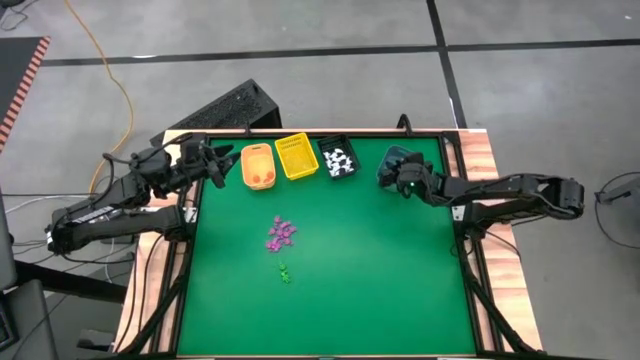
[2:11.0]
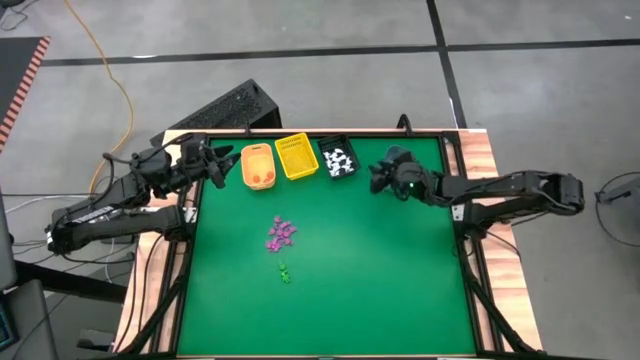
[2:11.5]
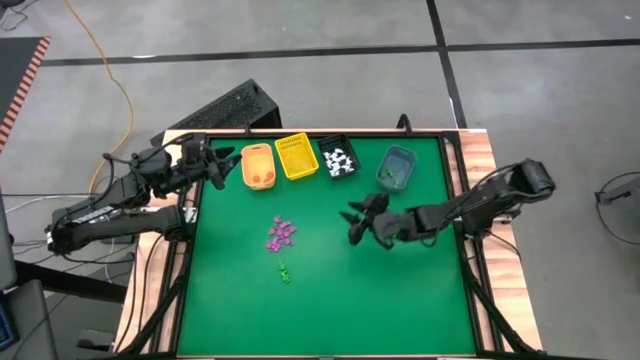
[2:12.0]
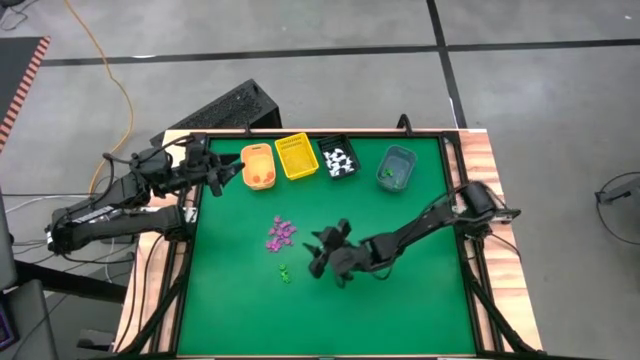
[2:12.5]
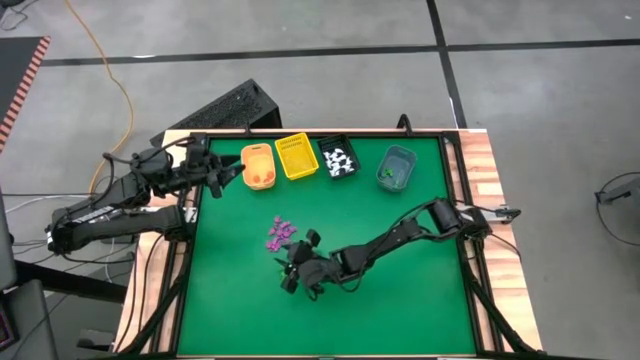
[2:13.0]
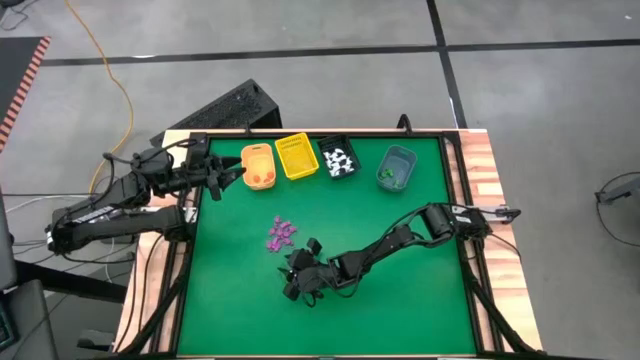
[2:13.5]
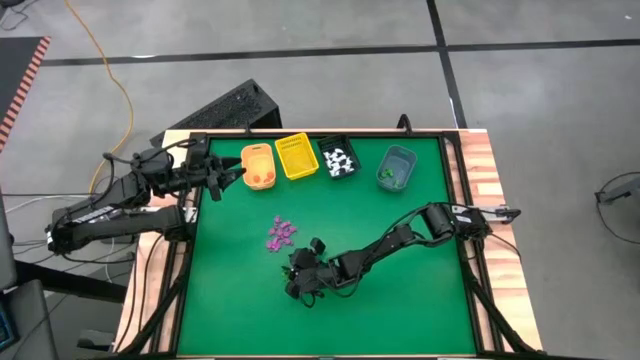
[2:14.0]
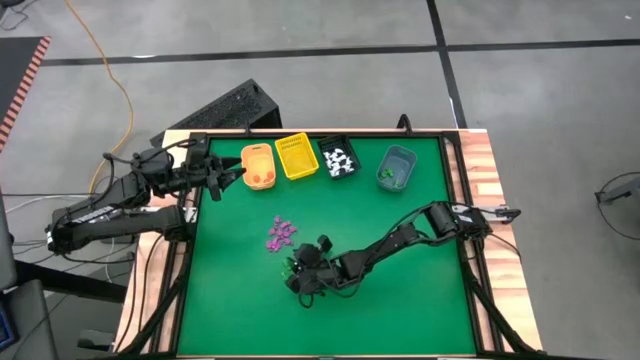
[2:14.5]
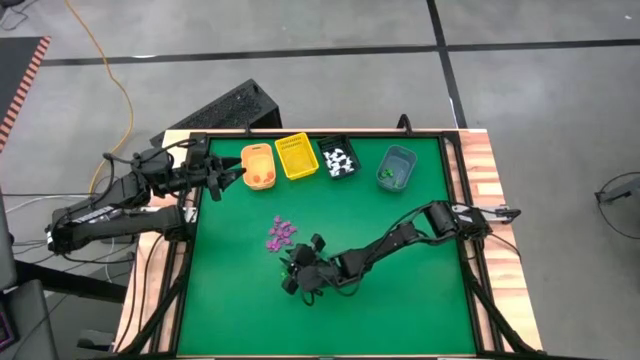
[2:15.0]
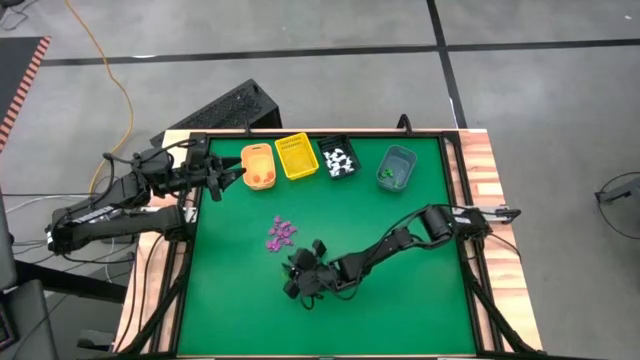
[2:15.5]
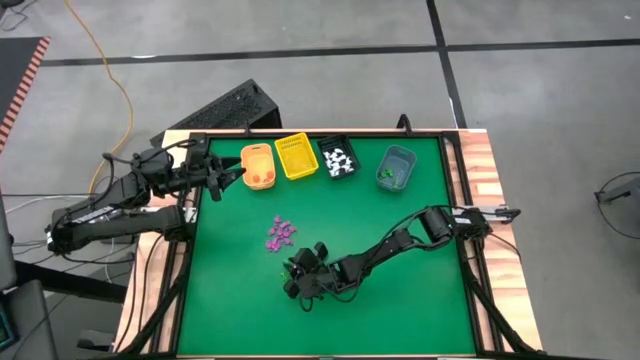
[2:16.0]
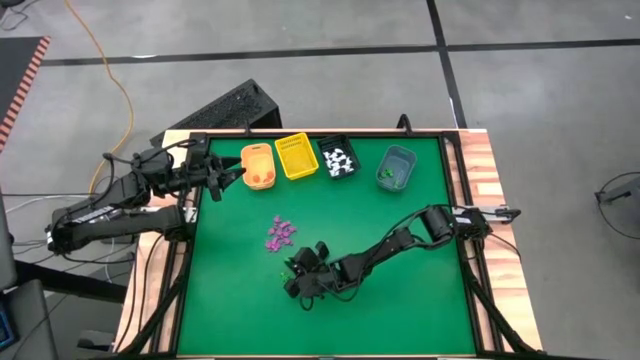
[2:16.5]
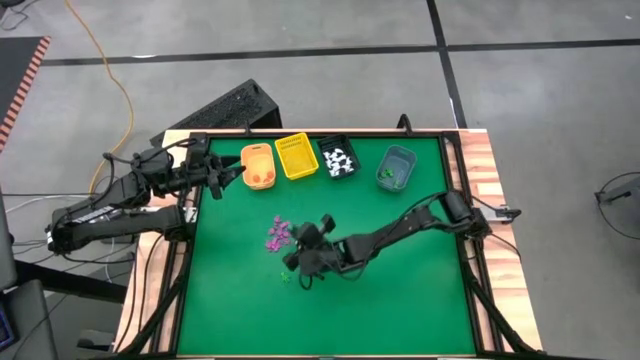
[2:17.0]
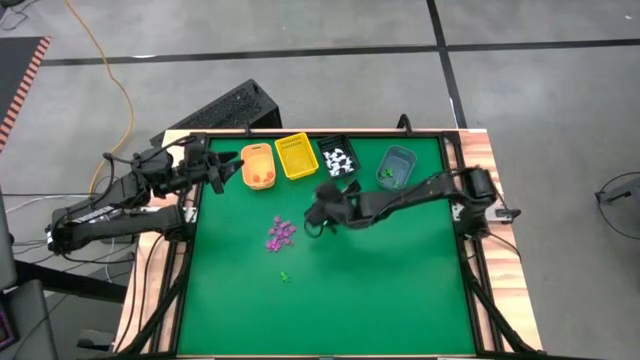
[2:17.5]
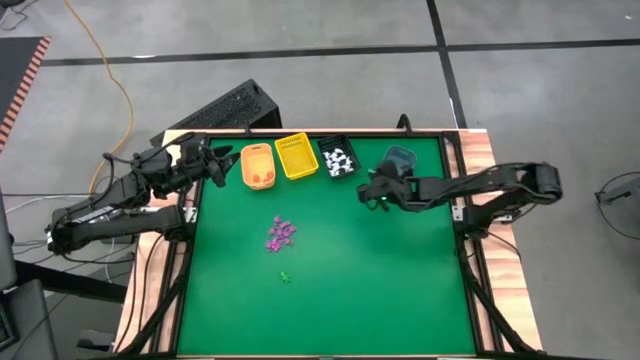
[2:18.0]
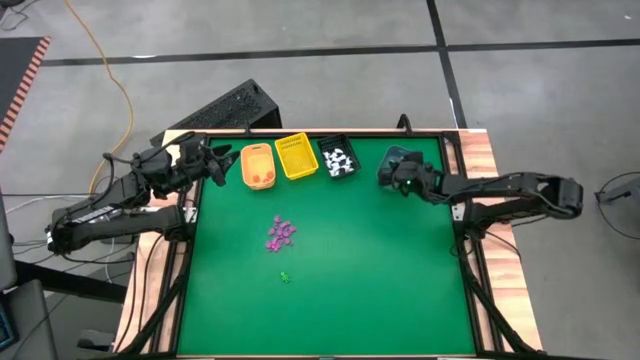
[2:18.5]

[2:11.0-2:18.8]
Task: Sort Halloween decoration
Put the green skeleton toy into the blue bin

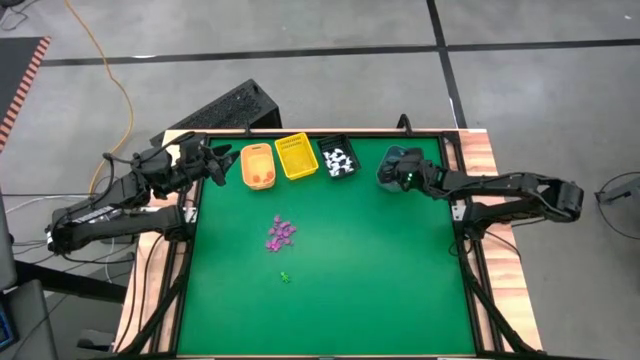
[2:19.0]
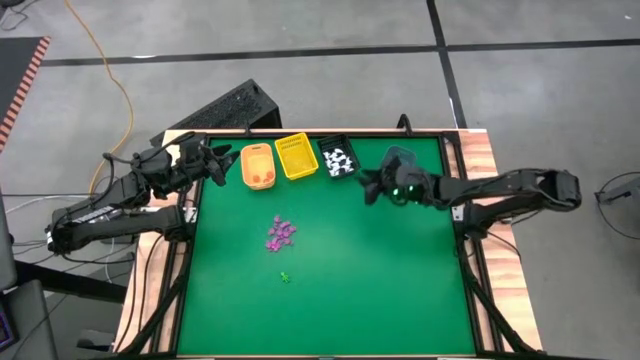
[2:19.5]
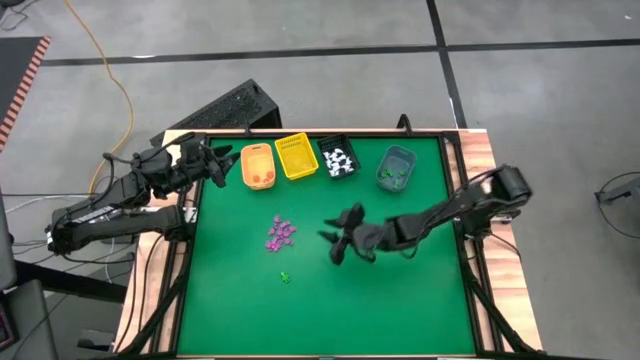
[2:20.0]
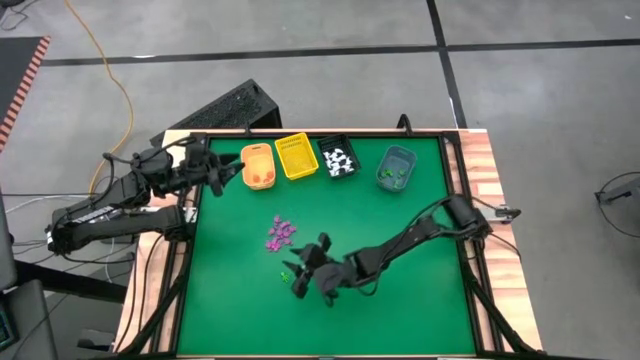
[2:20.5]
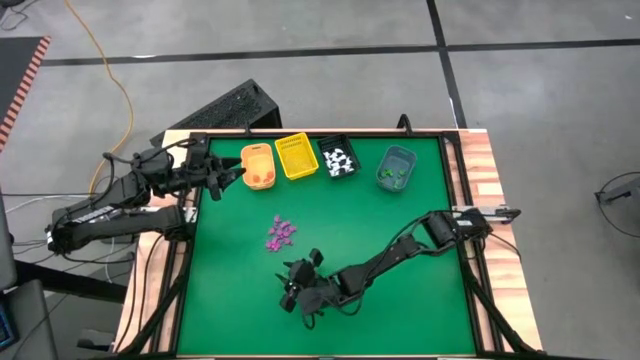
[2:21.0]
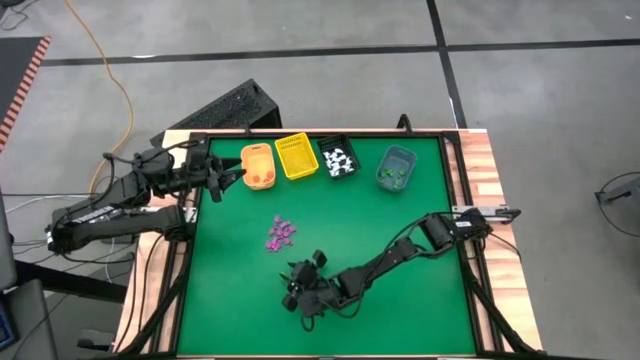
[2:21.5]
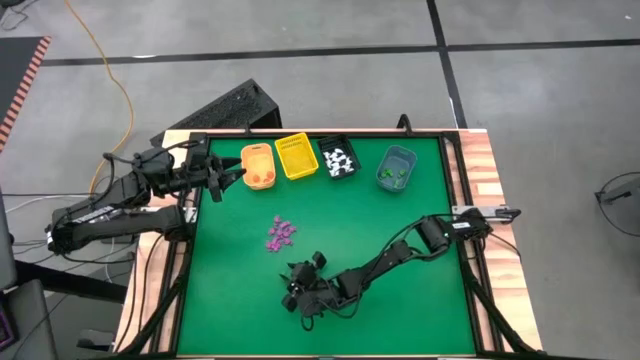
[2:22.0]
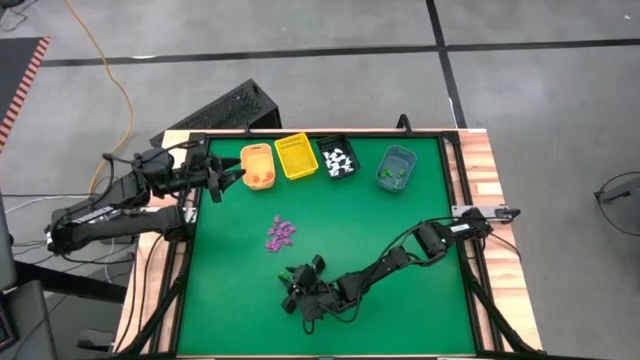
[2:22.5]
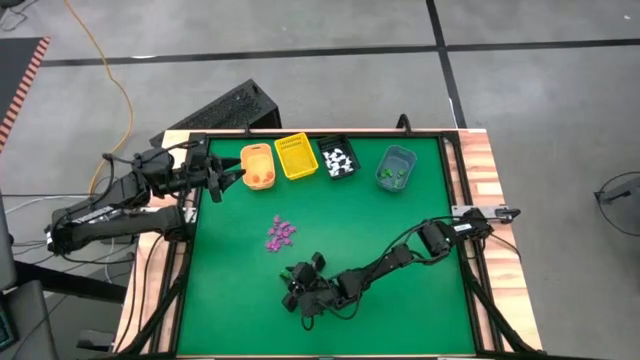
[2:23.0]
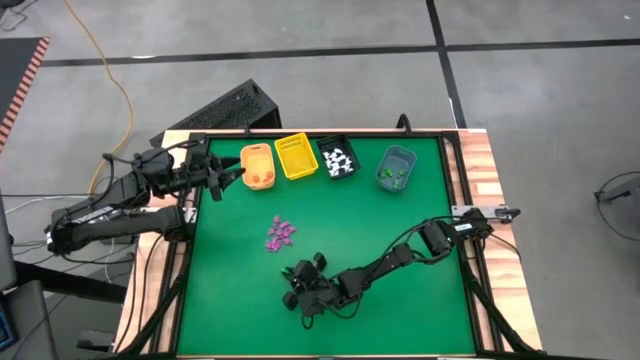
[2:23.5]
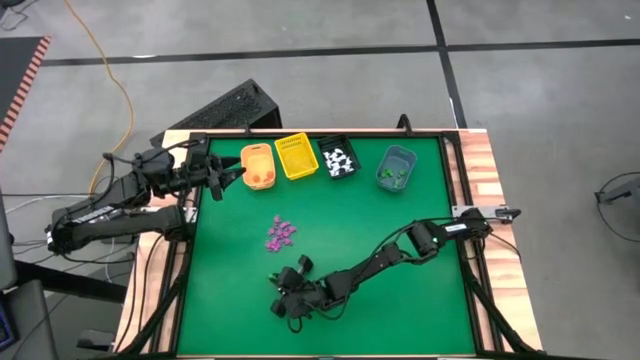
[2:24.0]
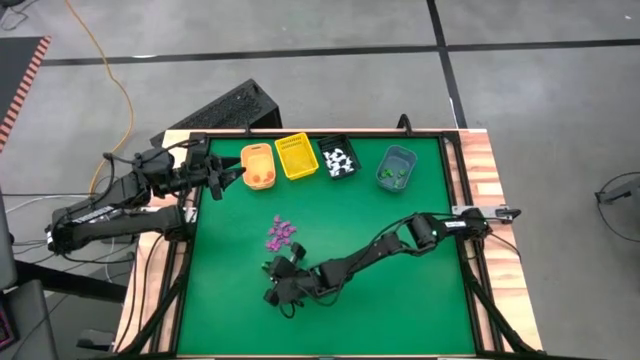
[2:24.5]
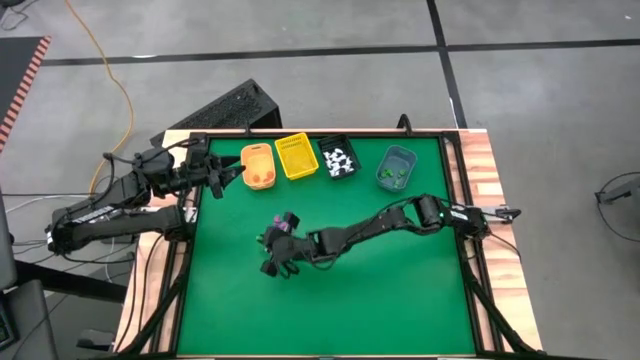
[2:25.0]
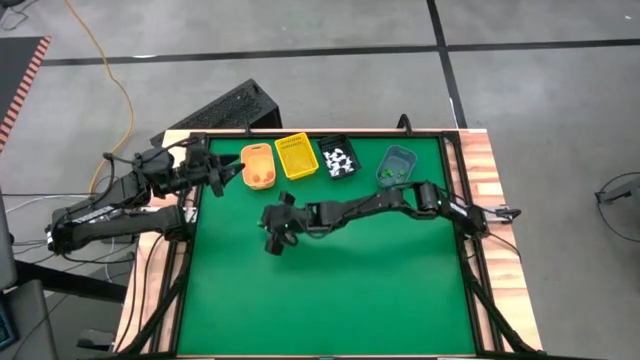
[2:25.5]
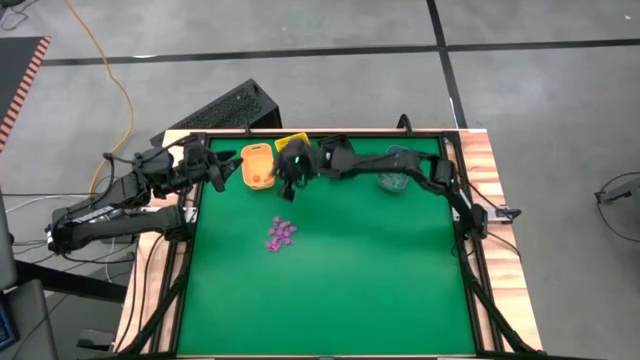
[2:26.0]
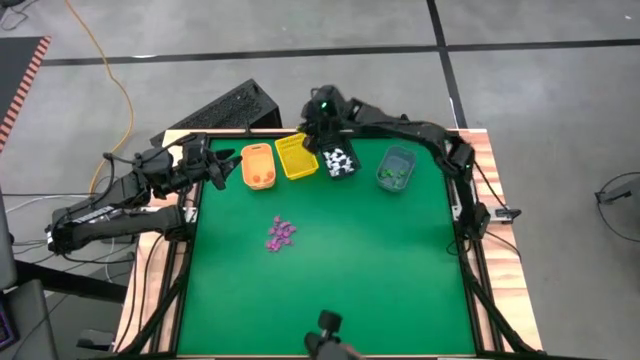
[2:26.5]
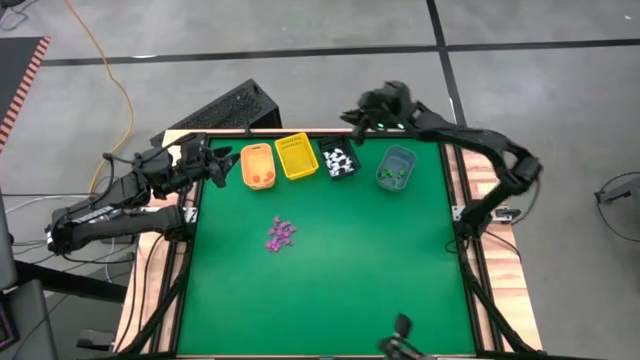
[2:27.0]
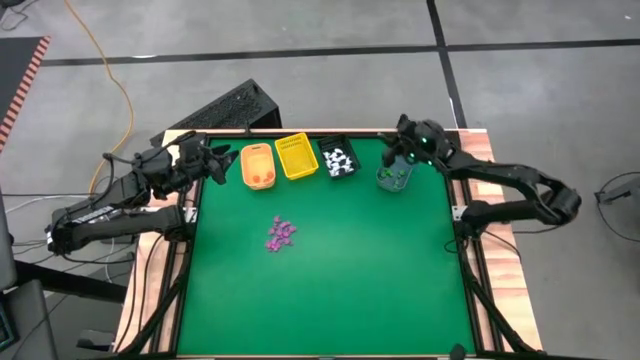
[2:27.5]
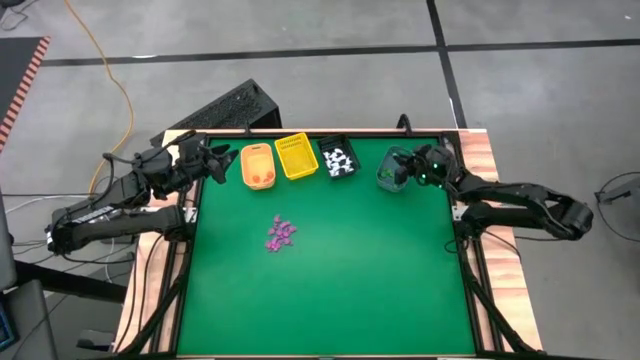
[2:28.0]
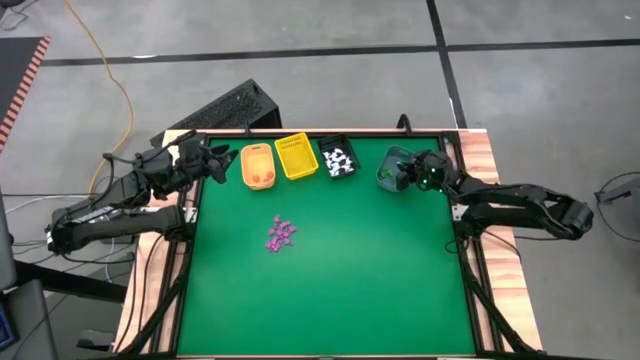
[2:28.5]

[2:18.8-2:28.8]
Put the green skeleton toy into the blue bin

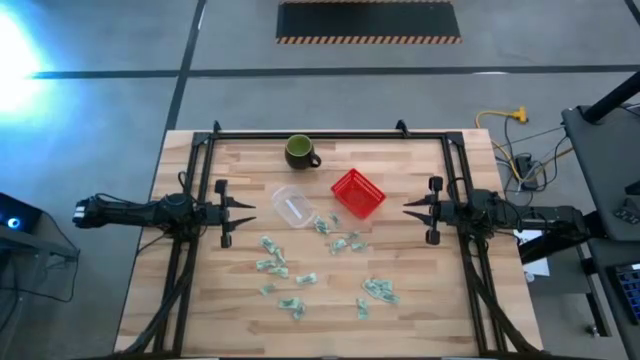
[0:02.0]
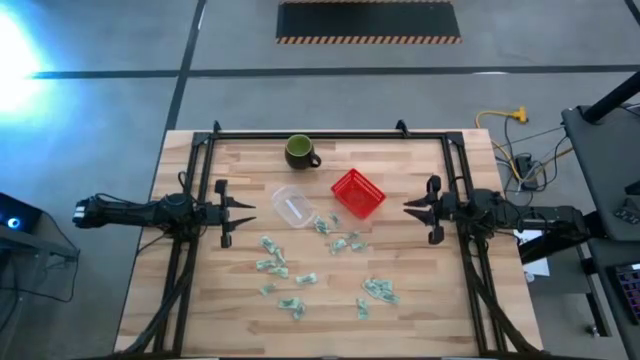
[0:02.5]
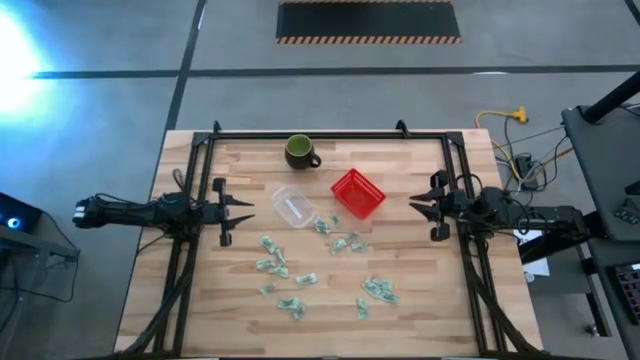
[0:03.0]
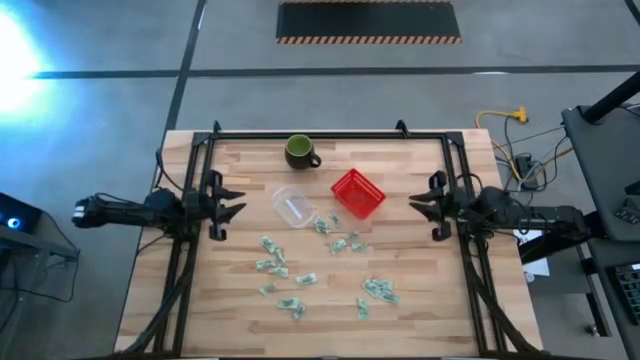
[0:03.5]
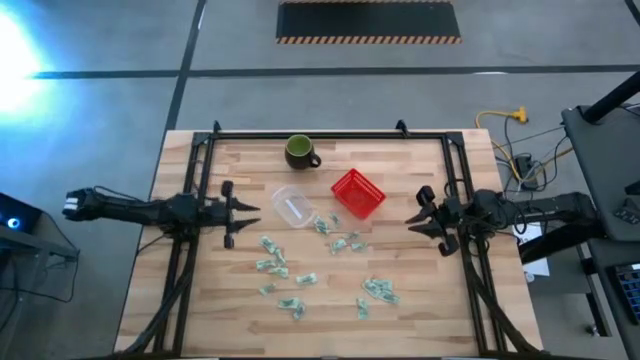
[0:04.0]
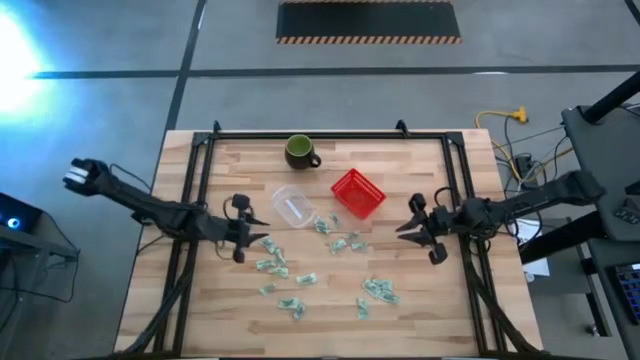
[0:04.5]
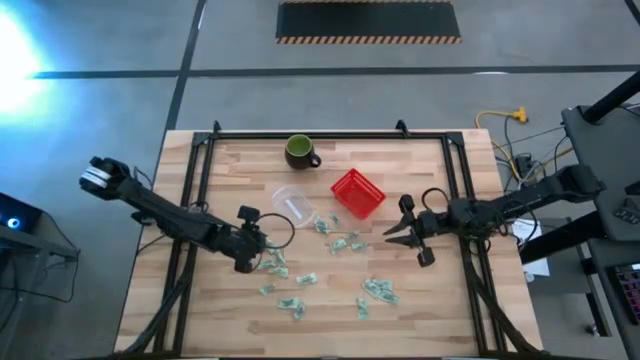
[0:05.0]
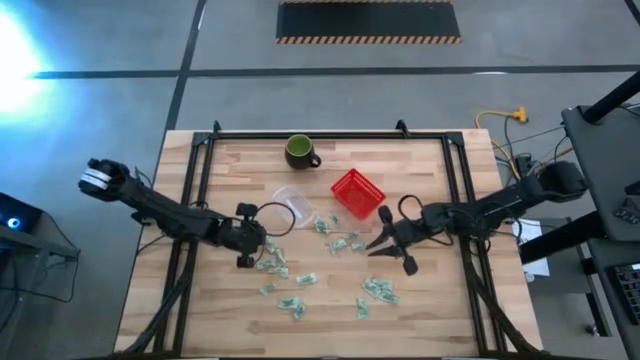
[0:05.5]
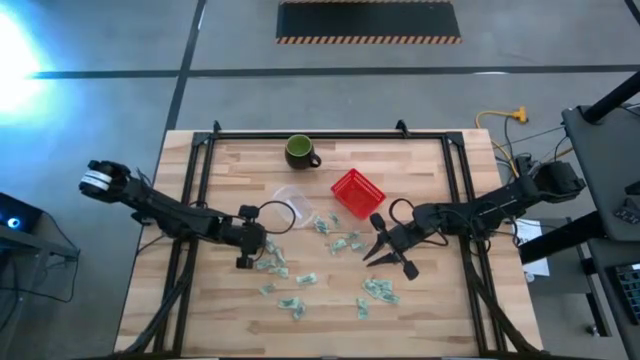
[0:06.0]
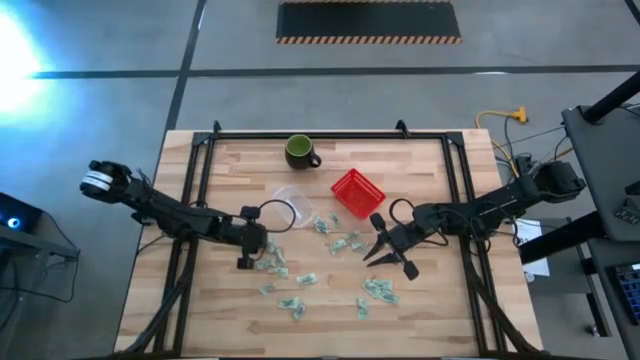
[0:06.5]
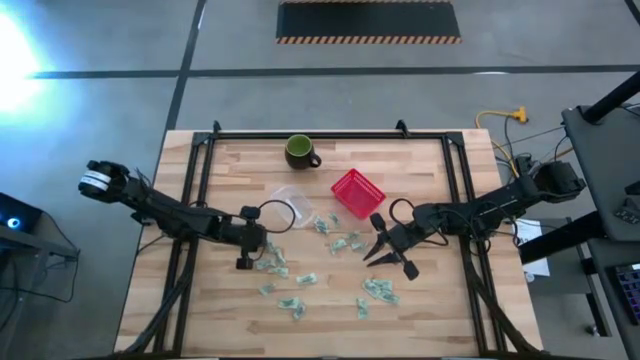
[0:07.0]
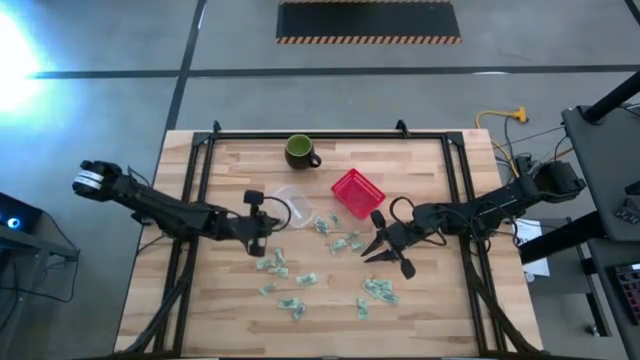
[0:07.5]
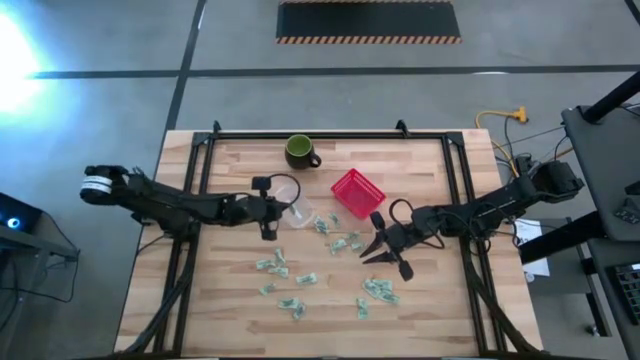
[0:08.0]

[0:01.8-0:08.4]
Task: Pick and place items into bin
Put the stevia packet into the transparent bin
